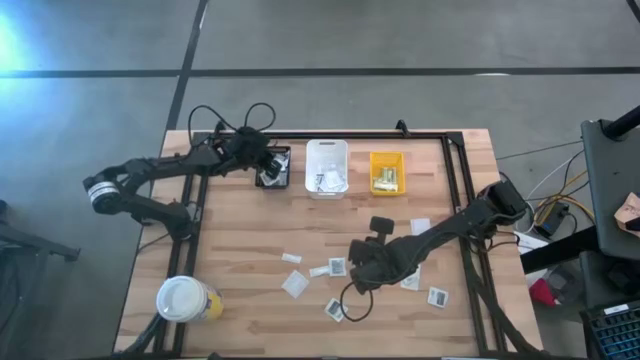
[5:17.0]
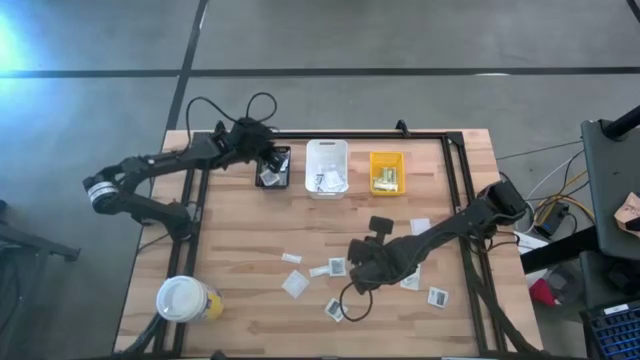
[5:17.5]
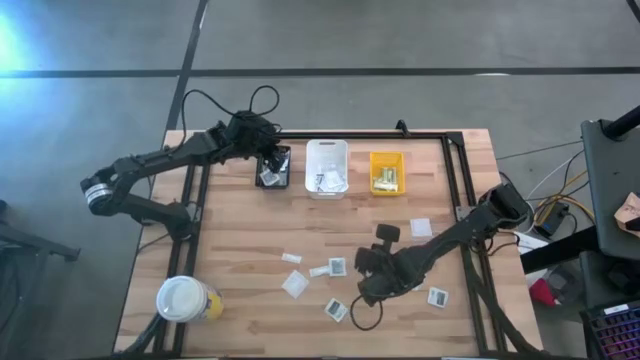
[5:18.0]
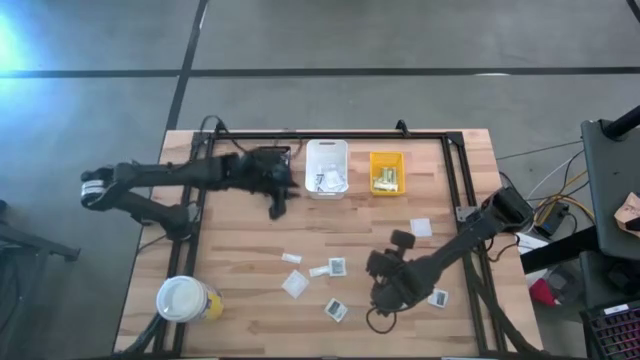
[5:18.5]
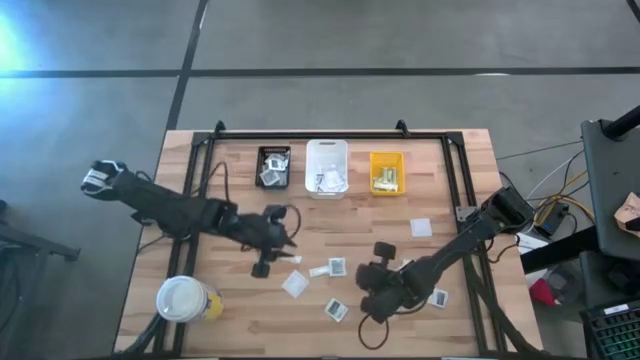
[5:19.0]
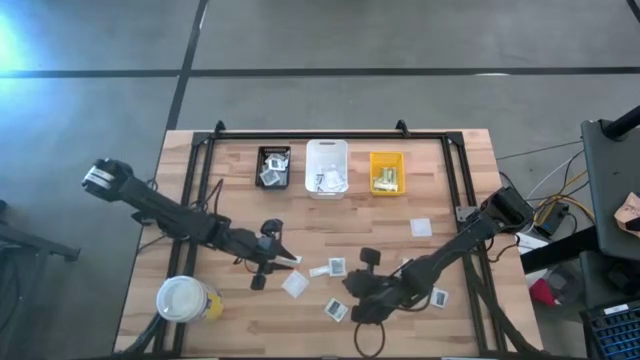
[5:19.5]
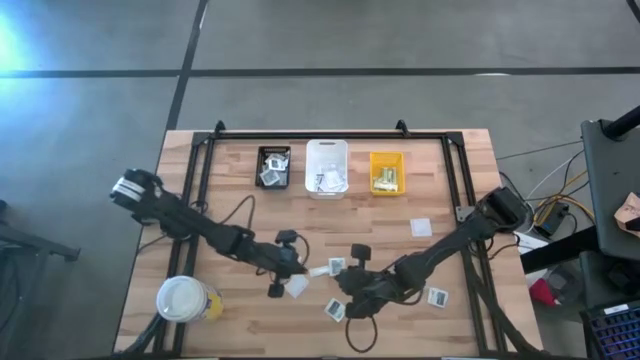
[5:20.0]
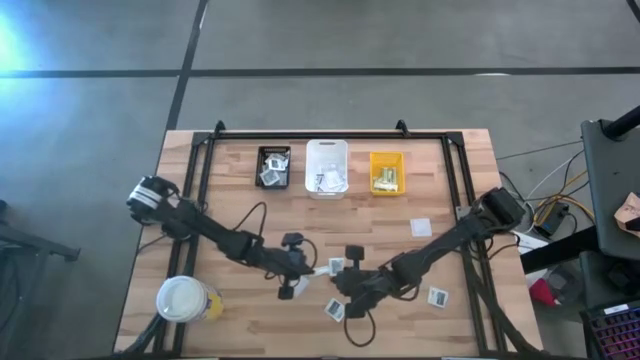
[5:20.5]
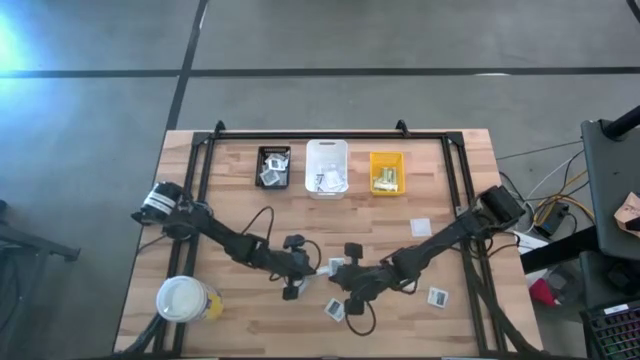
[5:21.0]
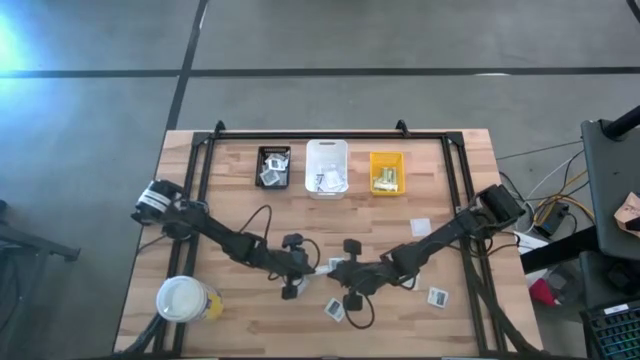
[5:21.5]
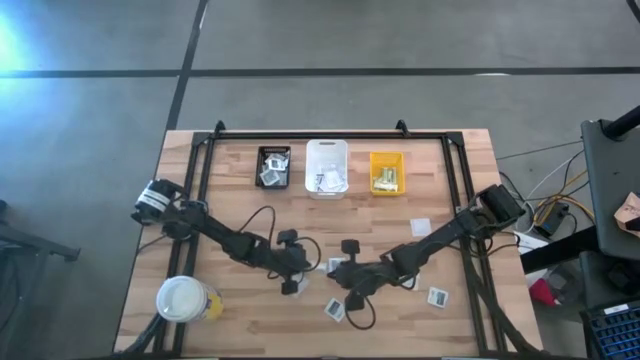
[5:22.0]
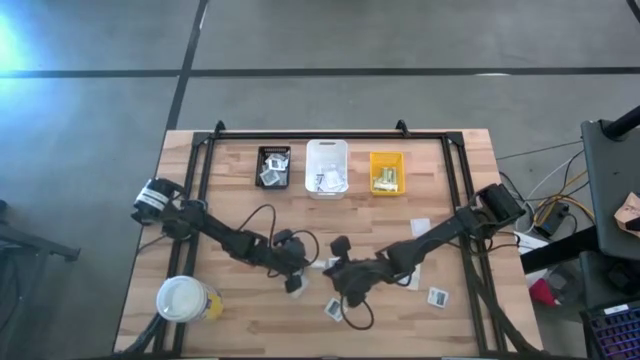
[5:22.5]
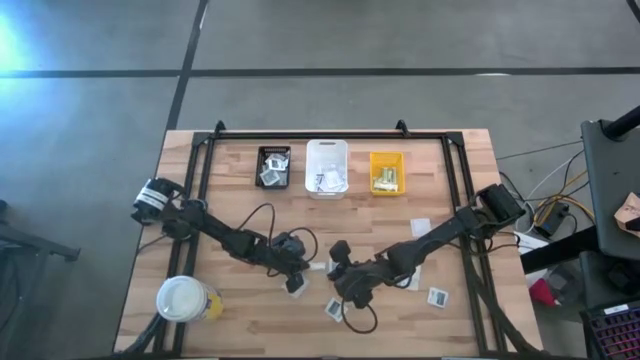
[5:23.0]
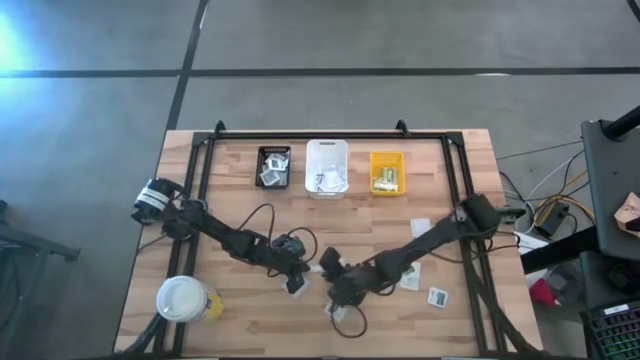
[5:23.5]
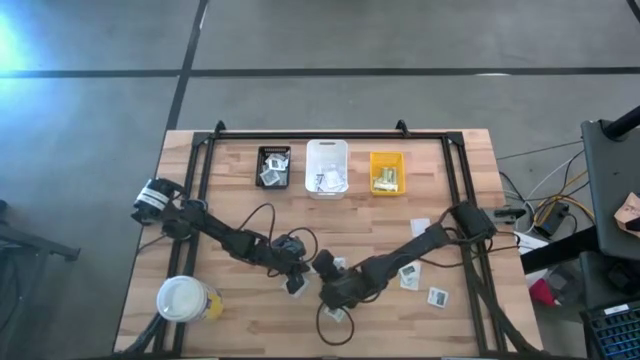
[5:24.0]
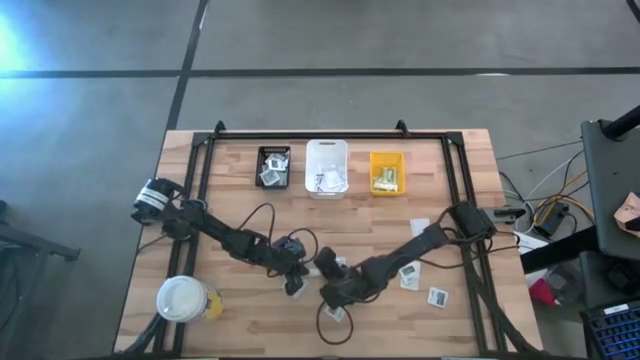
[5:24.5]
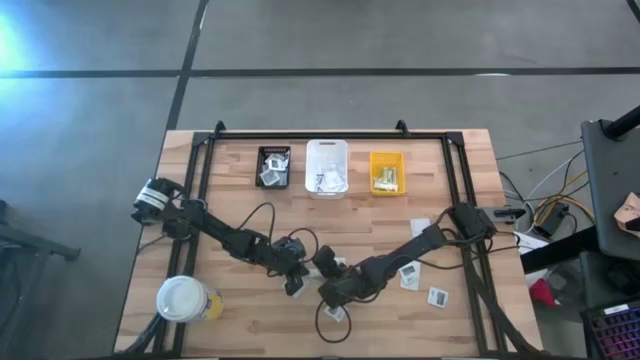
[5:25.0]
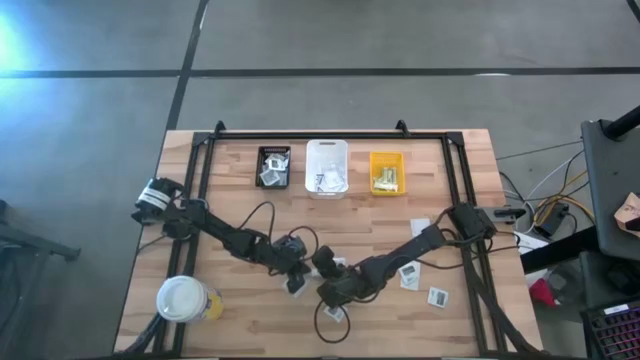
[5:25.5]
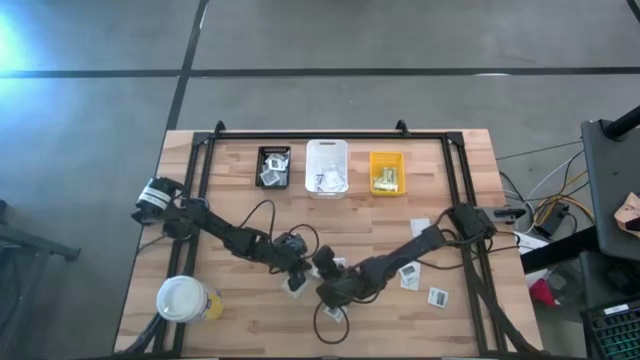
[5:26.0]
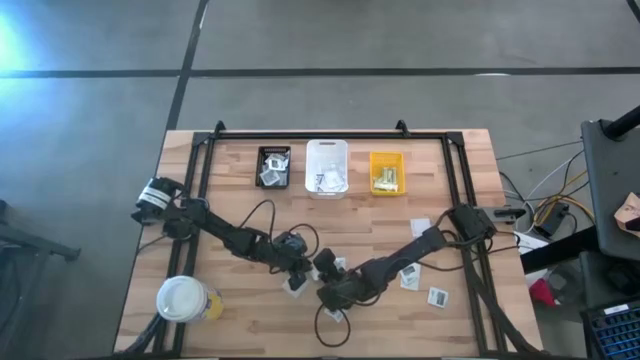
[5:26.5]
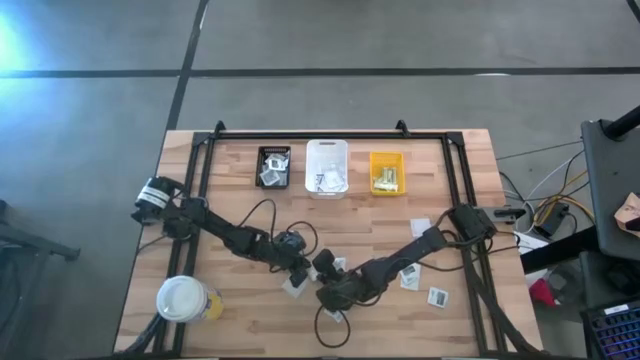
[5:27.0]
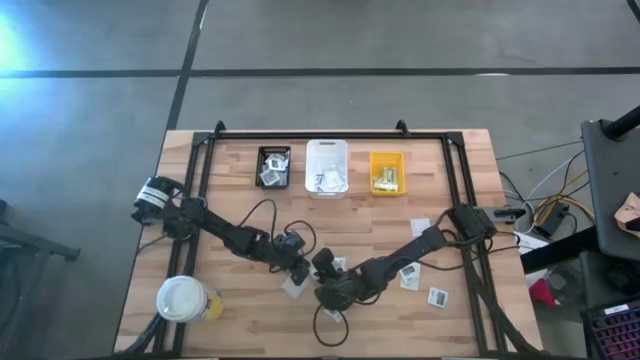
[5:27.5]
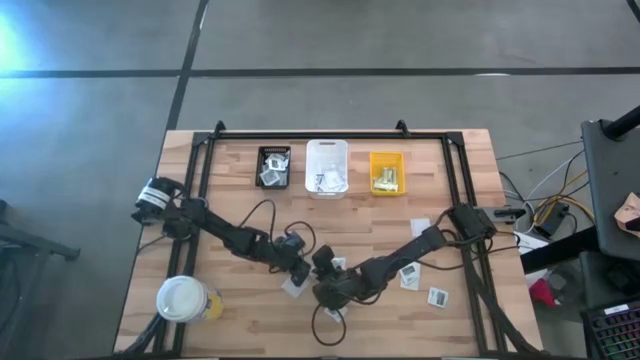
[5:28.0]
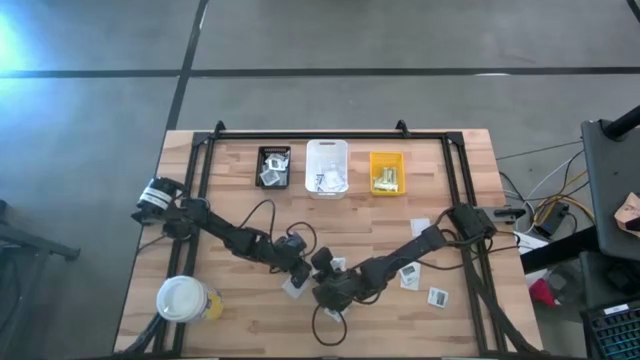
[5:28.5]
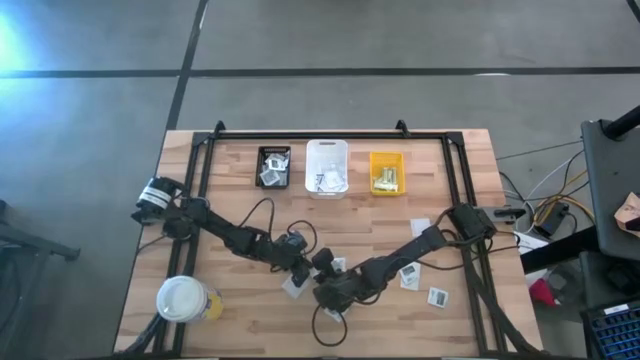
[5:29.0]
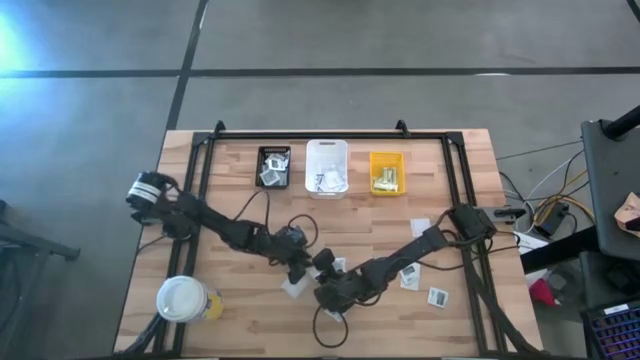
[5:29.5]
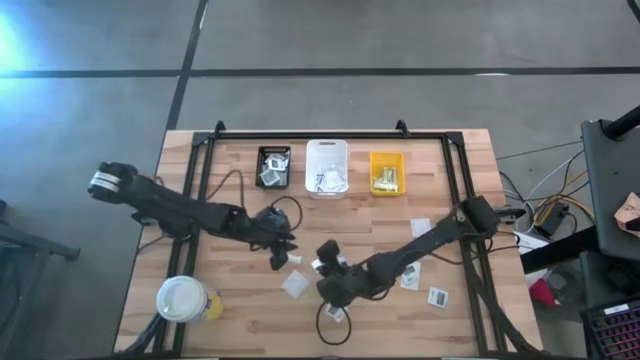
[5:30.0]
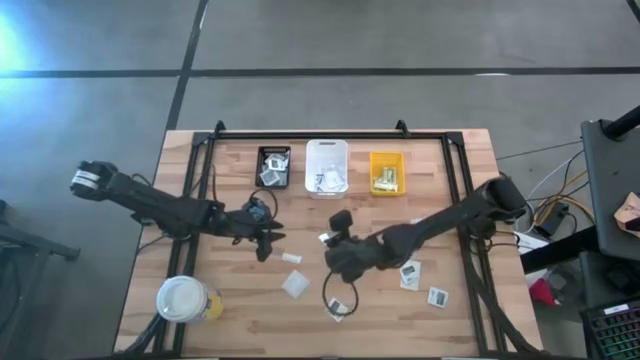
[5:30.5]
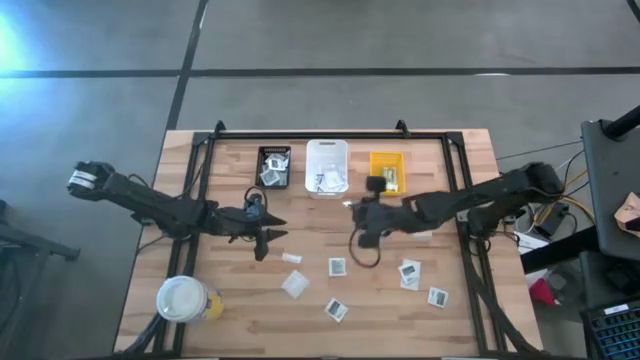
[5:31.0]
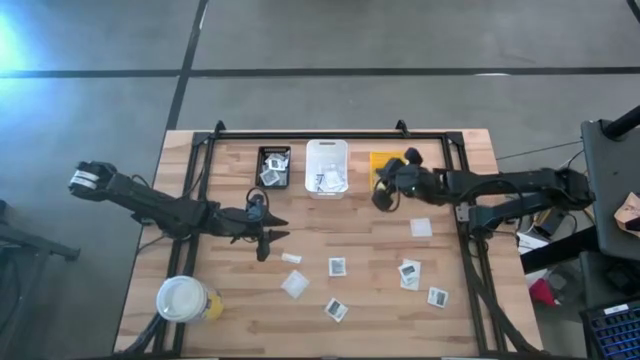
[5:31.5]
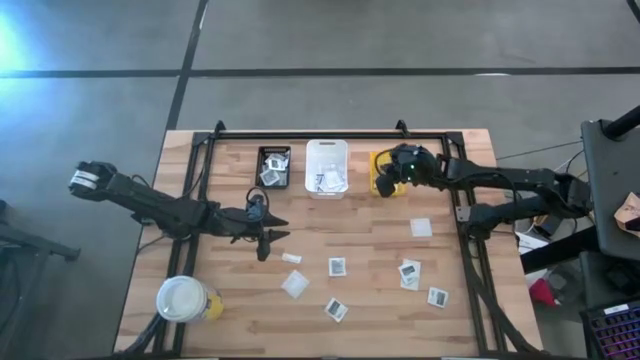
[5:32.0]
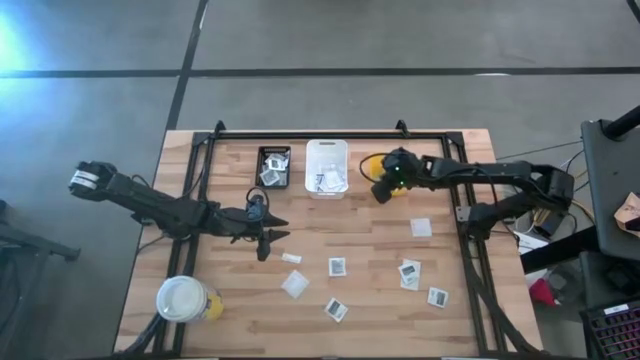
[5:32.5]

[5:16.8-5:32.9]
Task: Pick & Place First Aid Supplies
Put the green bandage into the yellow basket

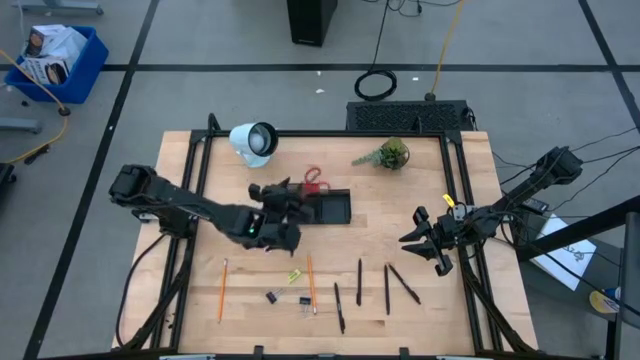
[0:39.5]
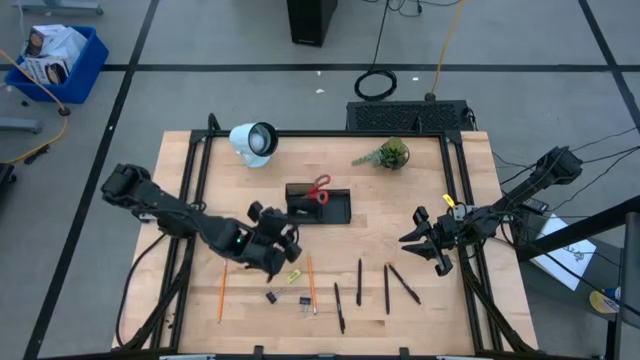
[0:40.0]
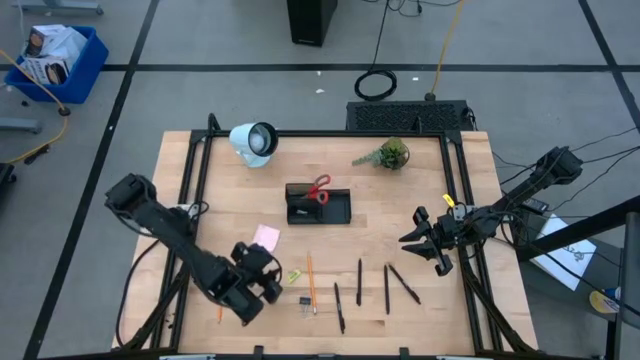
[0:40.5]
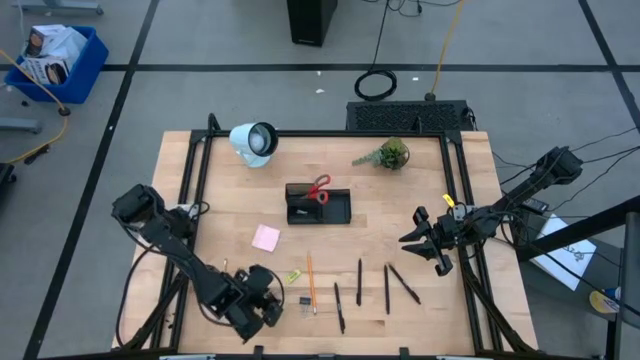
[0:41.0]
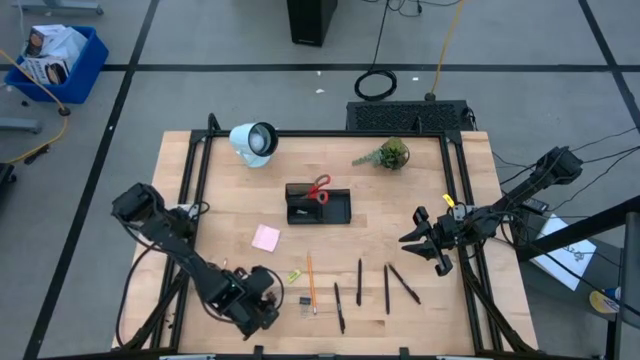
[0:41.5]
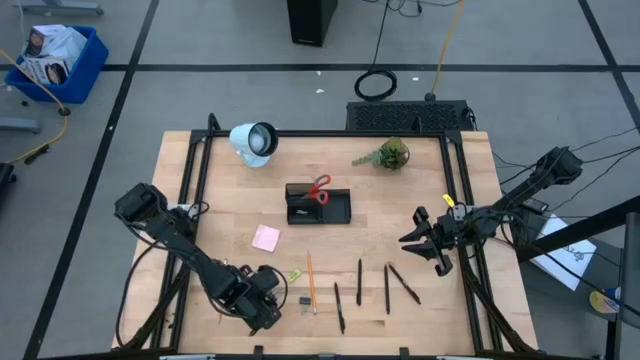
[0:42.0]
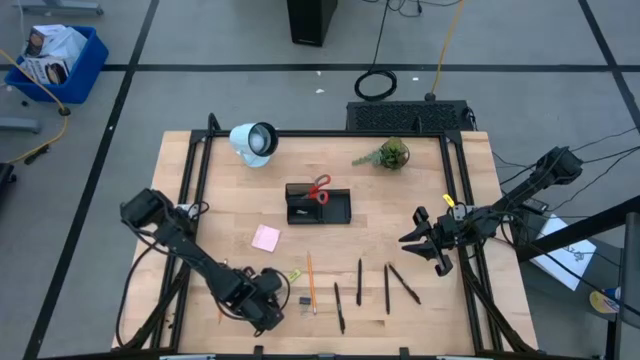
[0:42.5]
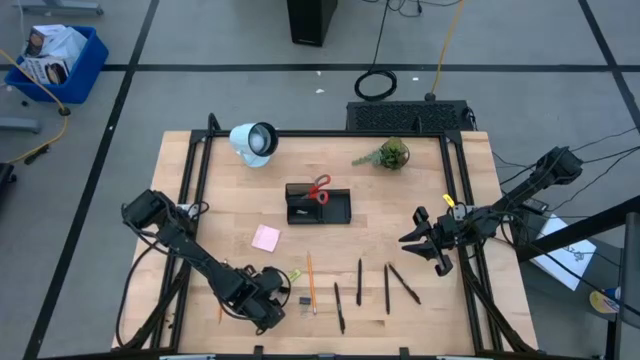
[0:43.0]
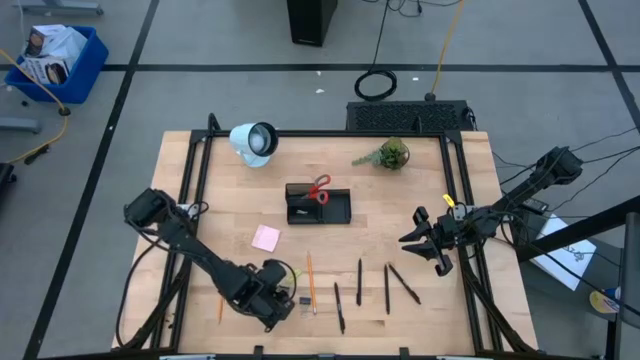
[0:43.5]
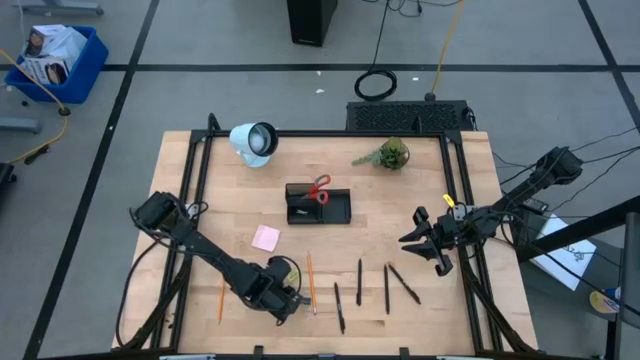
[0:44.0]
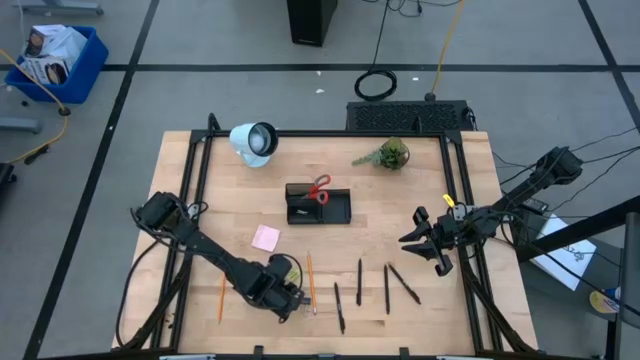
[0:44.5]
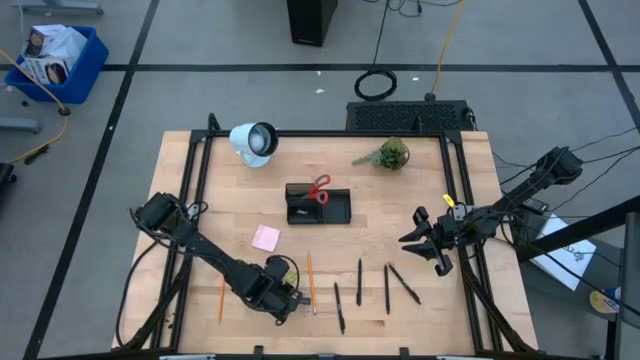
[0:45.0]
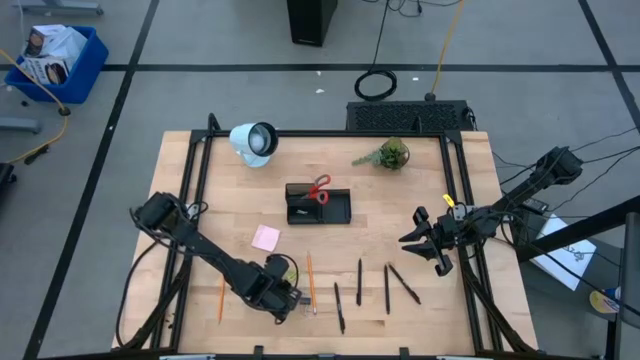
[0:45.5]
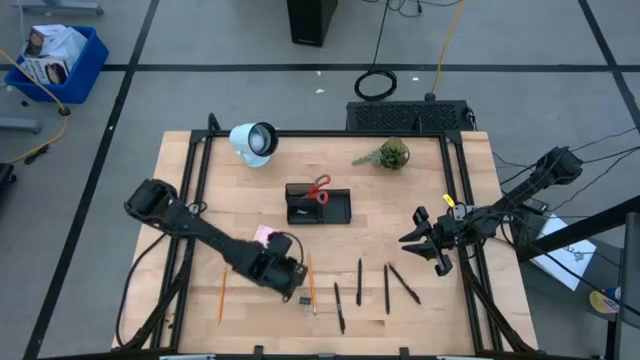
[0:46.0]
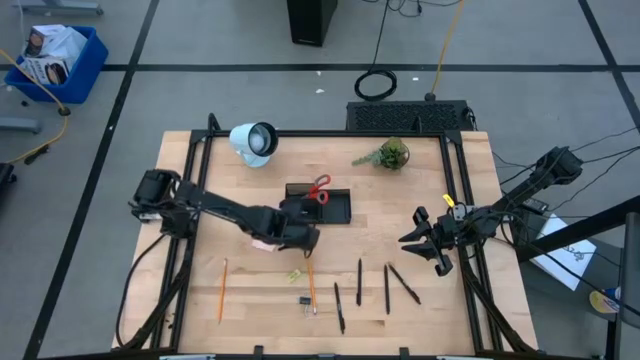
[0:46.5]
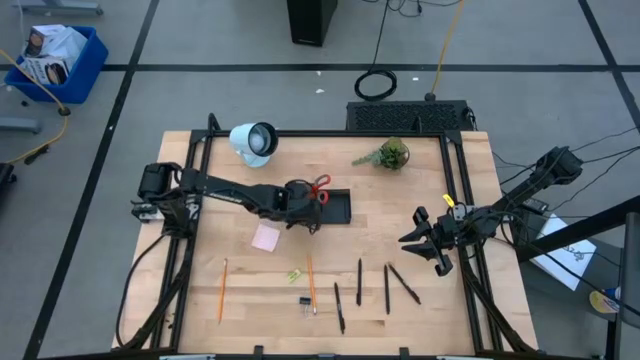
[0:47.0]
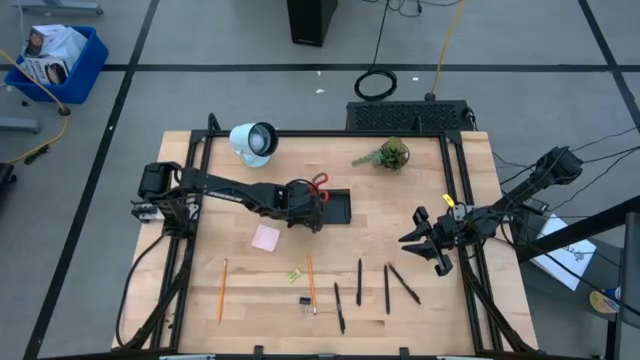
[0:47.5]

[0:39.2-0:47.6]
Task: Pick and place office supplies into organizer
Put the black binder clip into the black desk organizer
